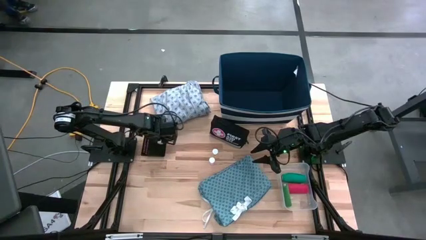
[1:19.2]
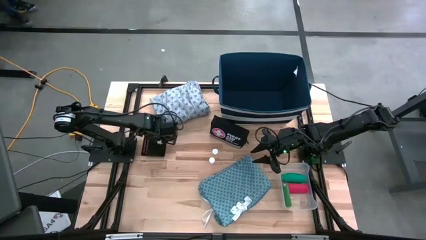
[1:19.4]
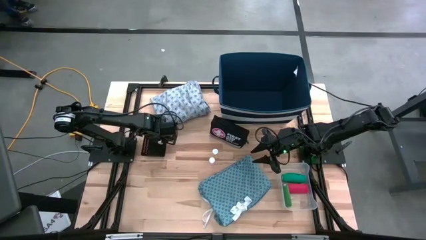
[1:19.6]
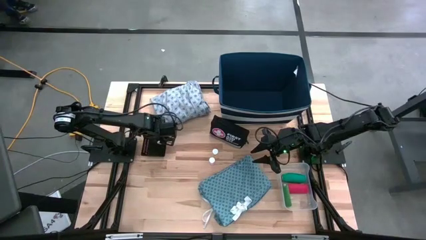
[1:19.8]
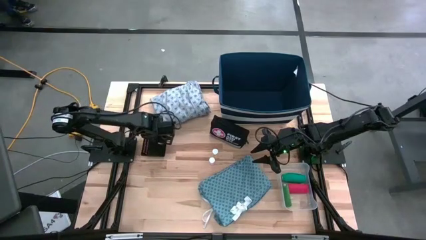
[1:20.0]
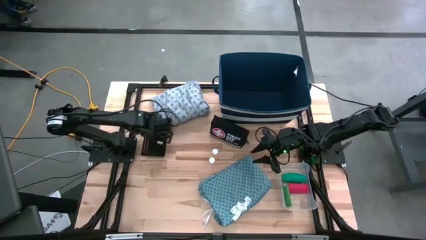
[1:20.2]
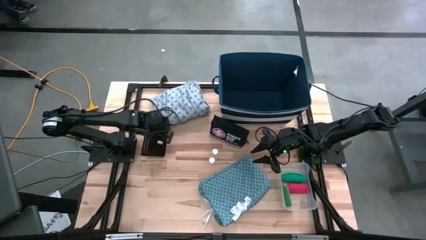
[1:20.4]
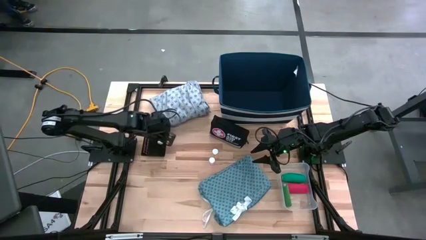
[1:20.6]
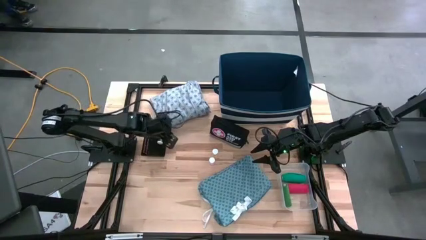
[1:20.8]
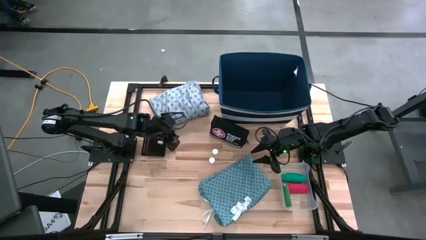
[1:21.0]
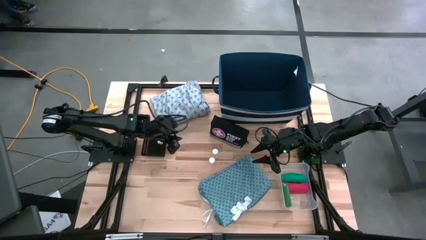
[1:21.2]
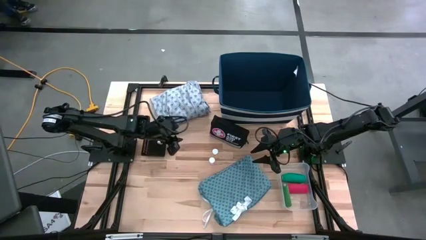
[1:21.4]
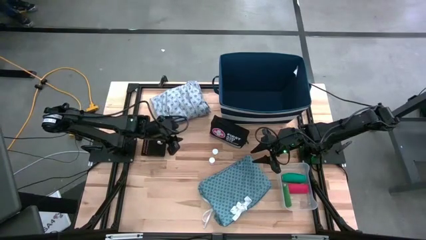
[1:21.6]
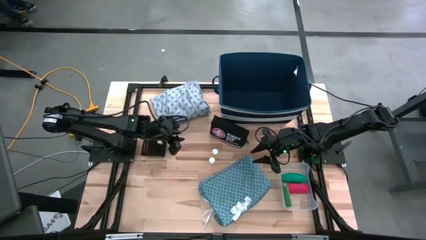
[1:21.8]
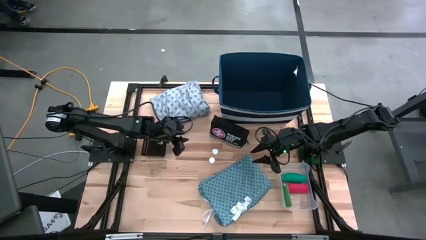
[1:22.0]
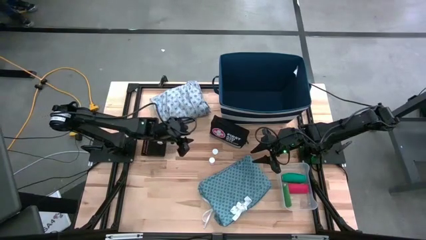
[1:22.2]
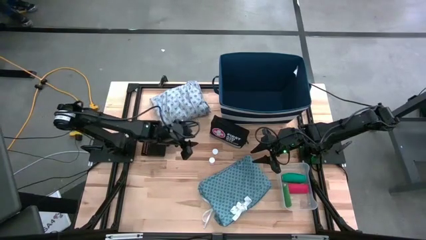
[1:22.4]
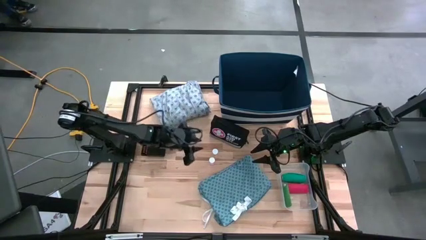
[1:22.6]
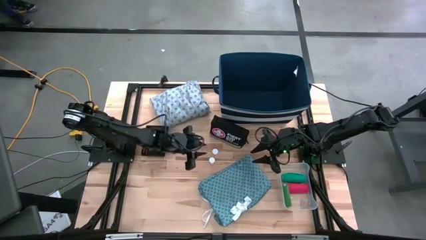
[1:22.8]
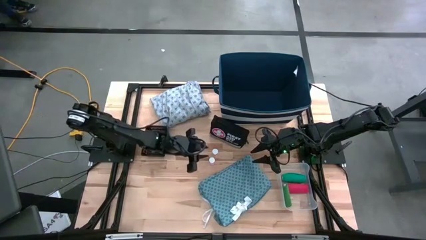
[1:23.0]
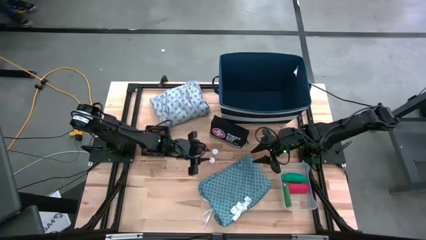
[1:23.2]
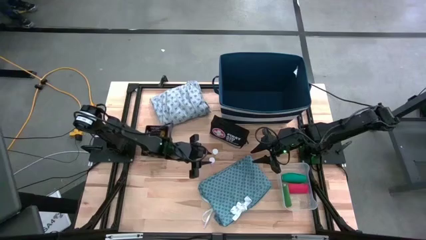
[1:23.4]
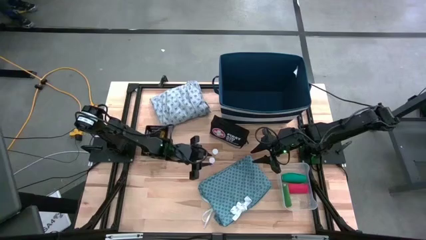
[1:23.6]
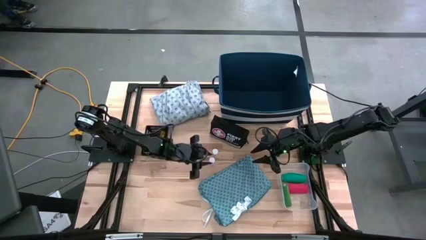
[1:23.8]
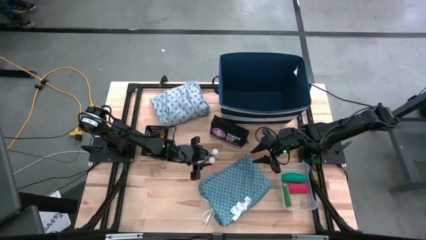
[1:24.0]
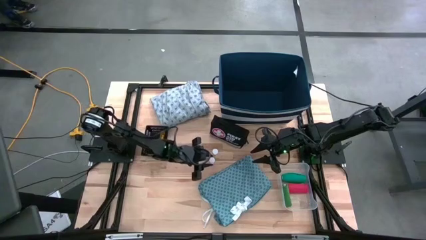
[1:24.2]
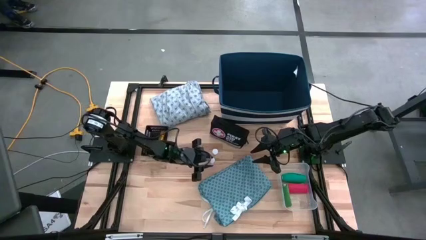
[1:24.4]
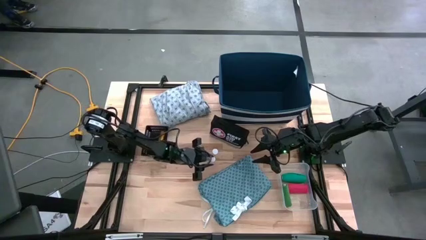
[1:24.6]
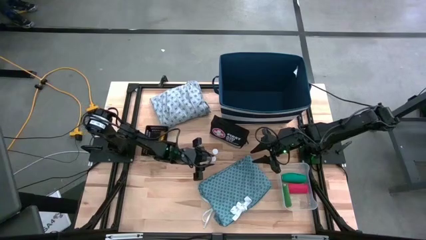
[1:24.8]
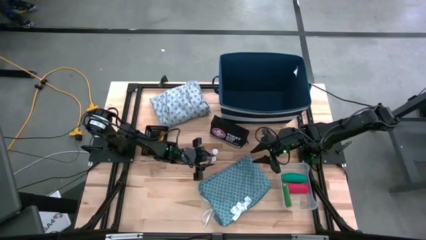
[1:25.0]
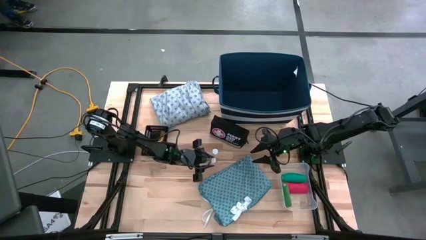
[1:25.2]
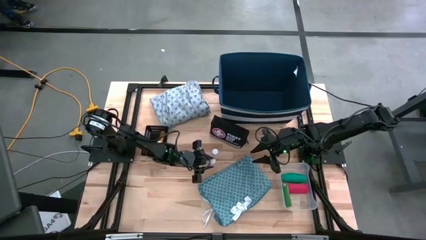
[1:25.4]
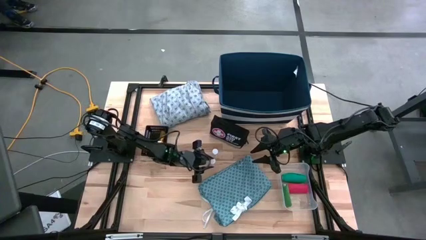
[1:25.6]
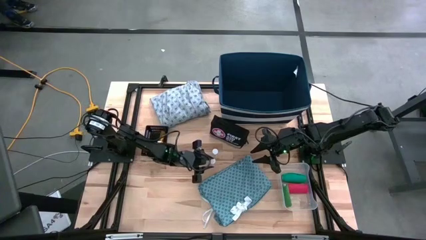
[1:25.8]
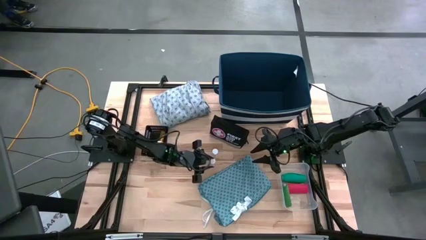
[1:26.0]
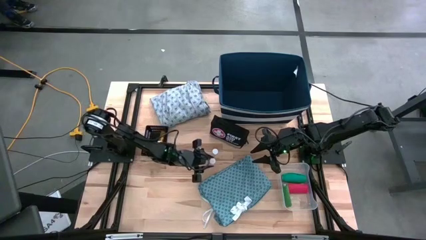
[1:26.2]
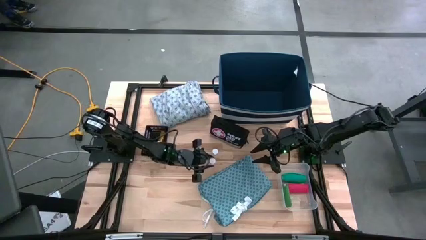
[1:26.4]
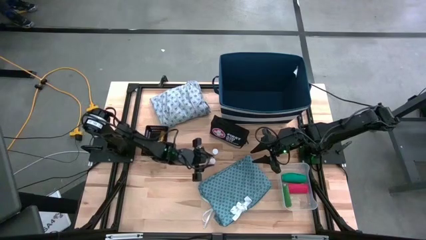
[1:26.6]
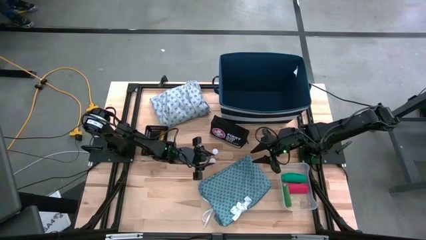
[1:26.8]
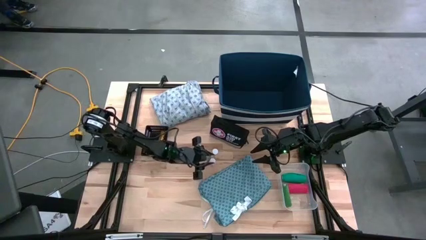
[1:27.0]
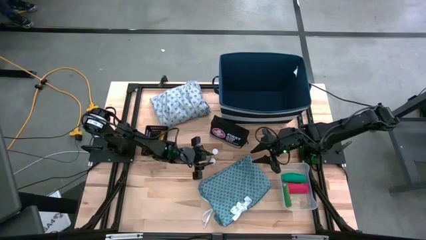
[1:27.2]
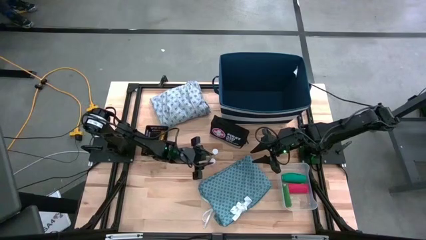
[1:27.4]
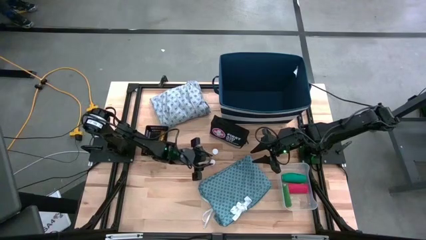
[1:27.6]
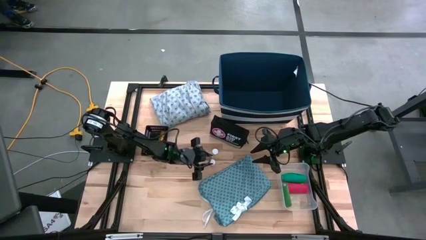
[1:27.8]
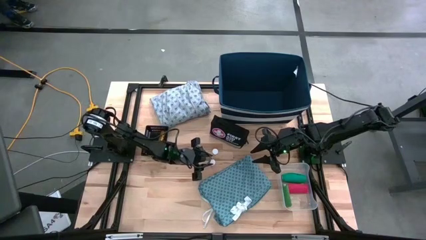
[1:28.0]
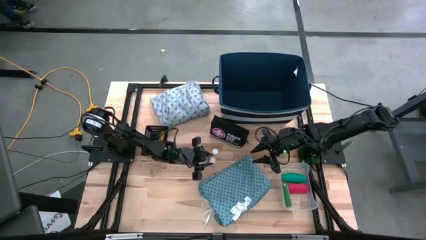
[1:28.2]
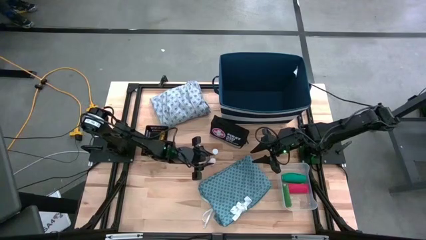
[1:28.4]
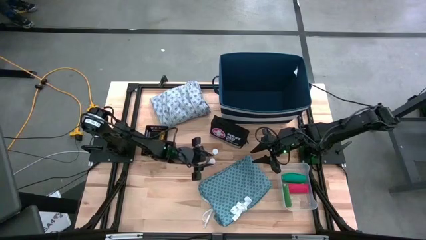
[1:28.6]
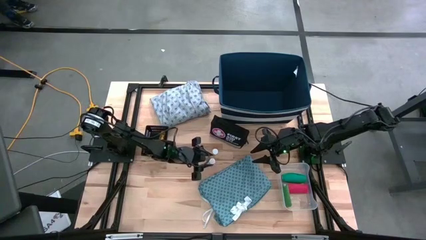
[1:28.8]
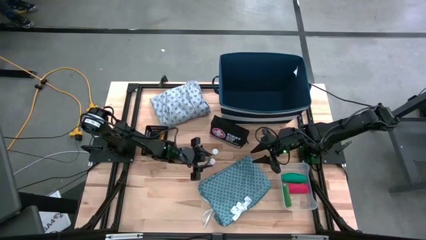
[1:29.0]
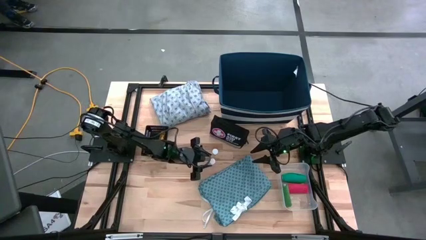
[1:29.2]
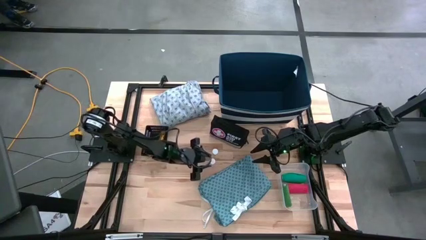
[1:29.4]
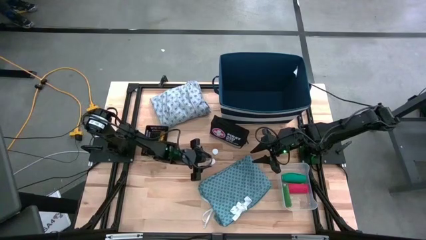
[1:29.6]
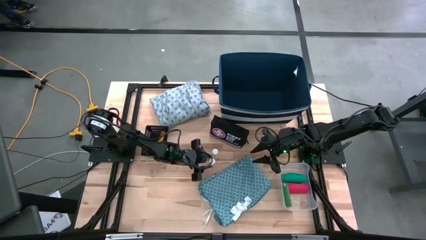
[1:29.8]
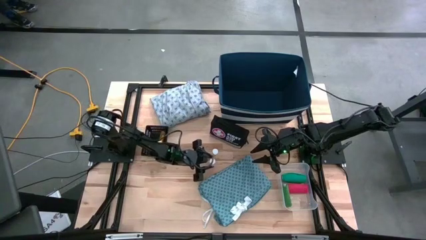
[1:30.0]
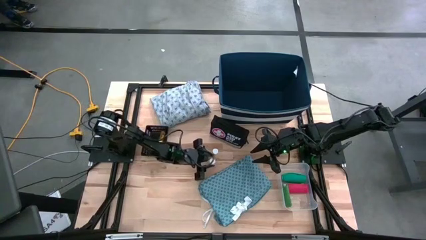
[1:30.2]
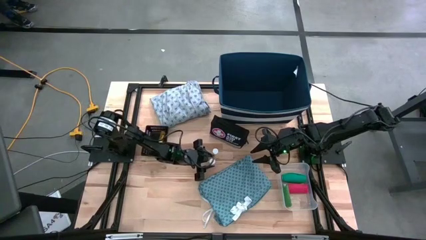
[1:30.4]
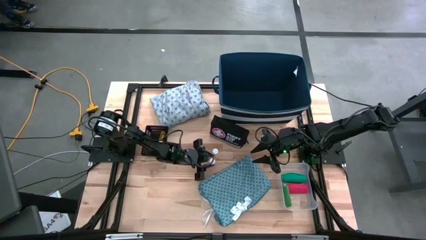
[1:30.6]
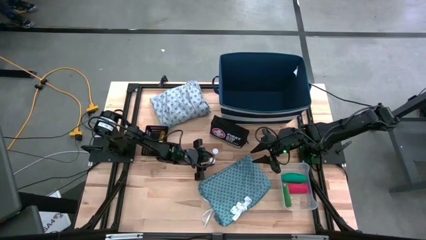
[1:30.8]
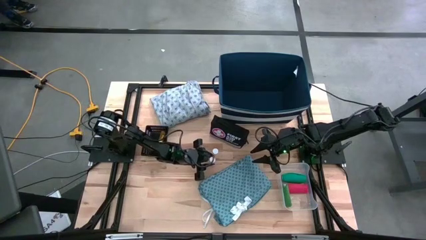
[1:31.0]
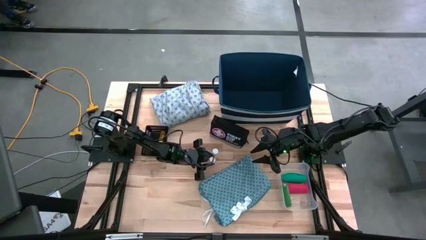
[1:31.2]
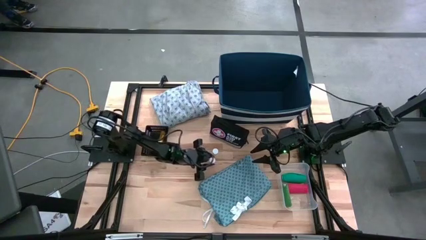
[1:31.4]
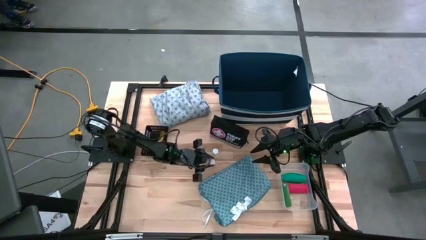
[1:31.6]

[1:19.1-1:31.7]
Task: Pick & place medical supplies in basket/bin
Put the pink pill bottle into the black bin

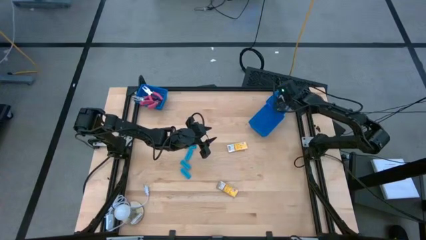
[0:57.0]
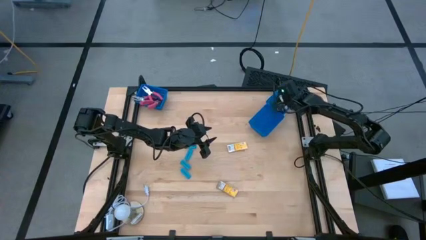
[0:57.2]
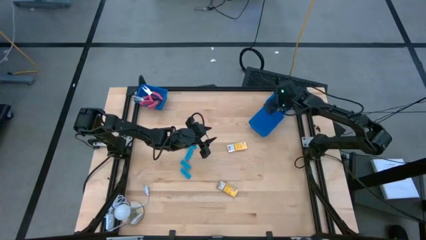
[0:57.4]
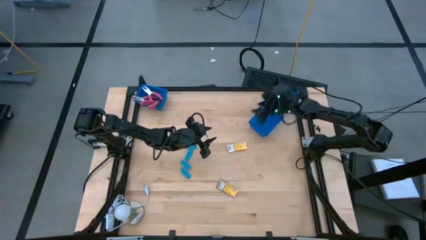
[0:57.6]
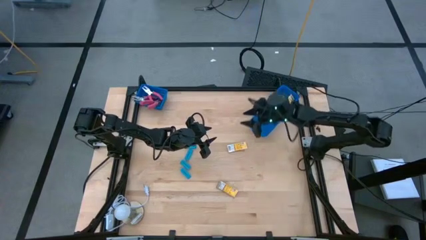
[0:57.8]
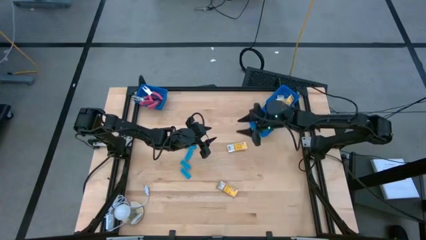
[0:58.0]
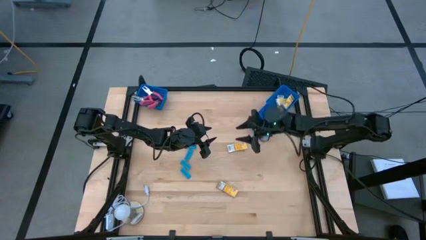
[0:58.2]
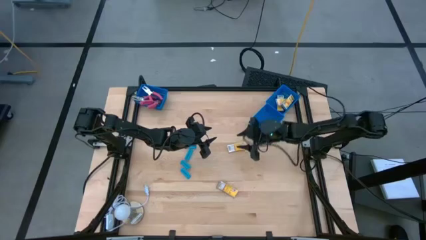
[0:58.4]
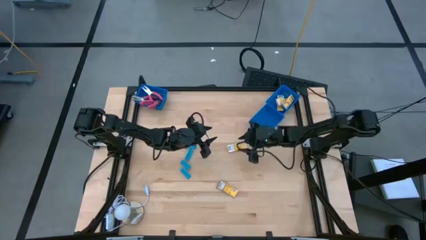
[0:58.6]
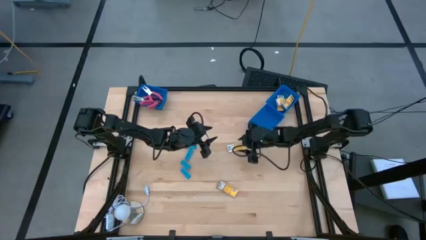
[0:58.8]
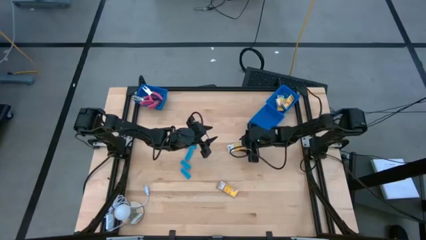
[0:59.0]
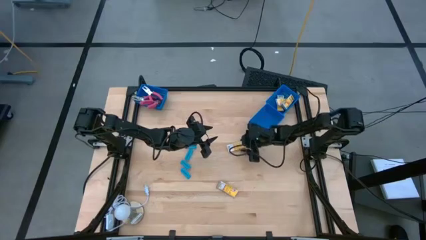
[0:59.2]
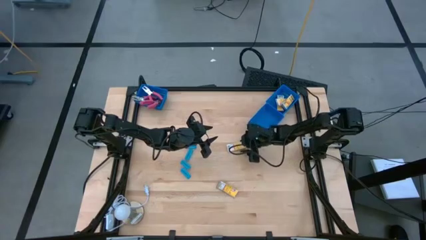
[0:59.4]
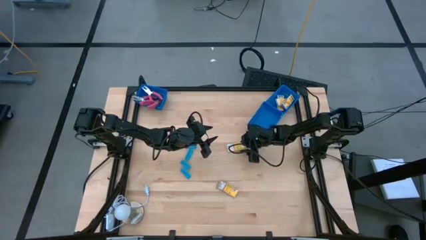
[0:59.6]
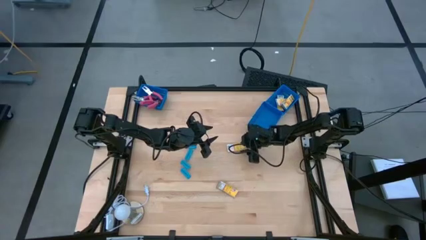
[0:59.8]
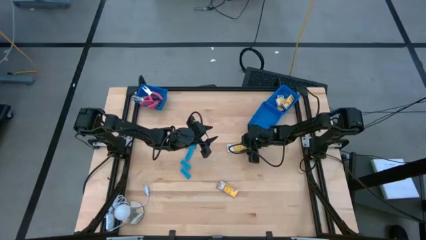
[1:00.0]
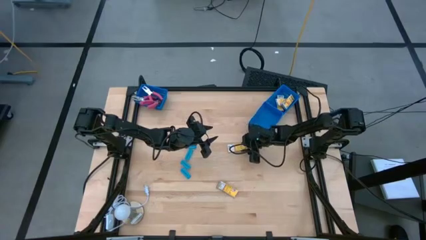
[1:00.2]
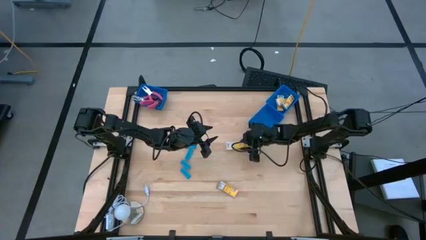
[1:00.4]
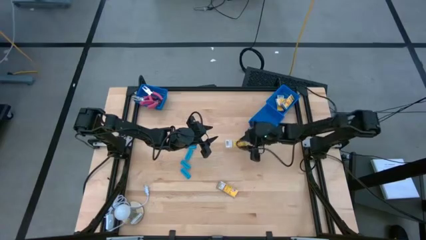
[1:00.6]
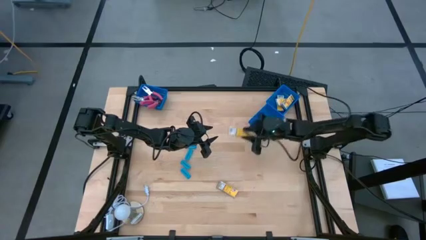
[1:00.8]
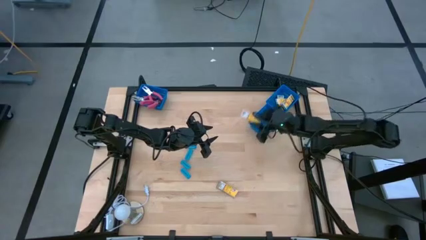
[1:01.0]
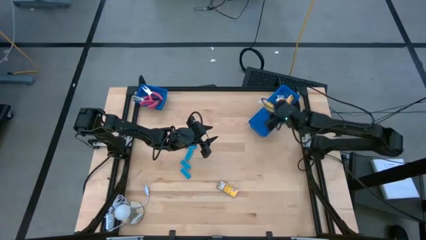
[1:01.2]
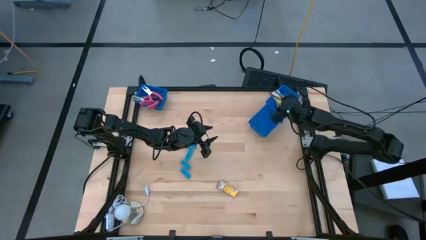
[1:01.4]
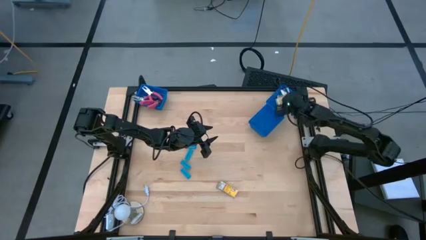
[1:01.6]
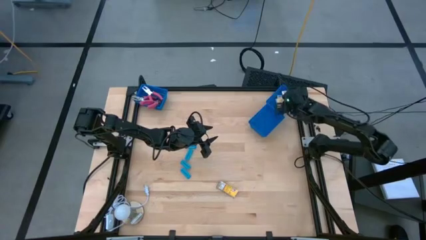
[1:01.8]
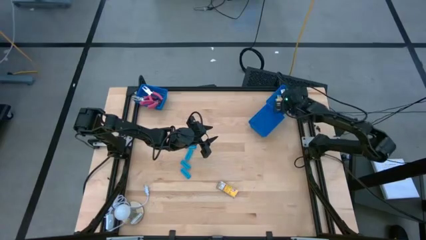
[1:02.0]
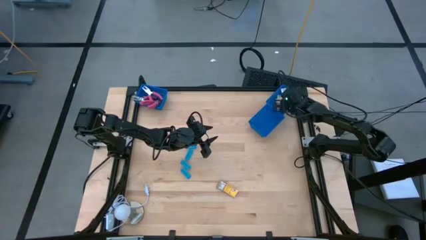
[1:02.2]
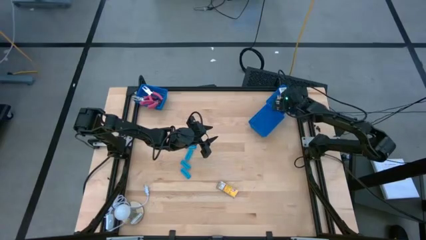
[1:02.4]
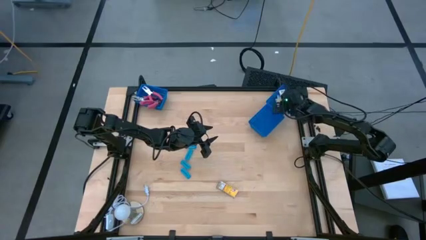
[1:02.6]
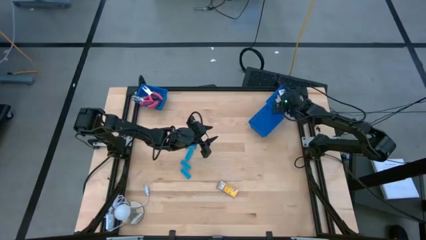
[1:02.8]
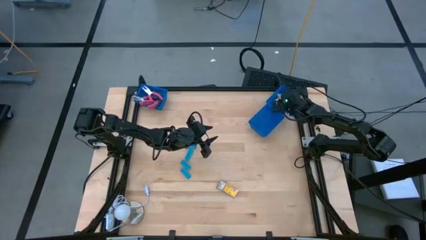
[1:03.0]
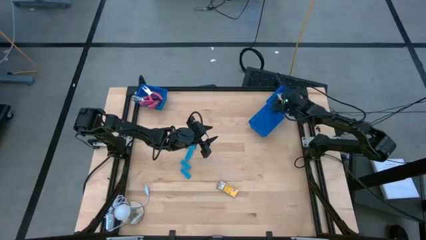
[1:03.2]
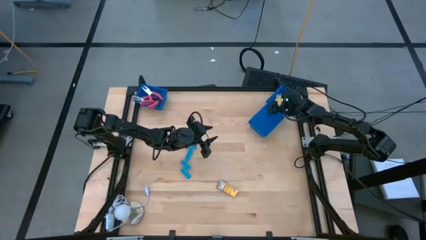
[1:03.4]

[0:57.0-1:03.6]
Task: Pick & Place School Supplies
Put the yellow crayon box into the top right blue basket
